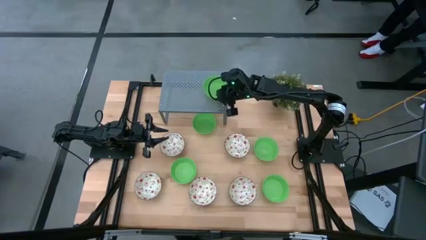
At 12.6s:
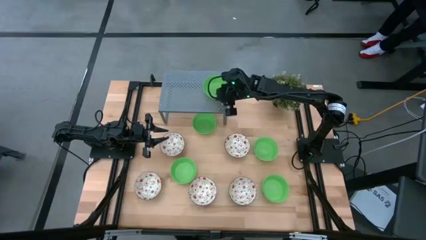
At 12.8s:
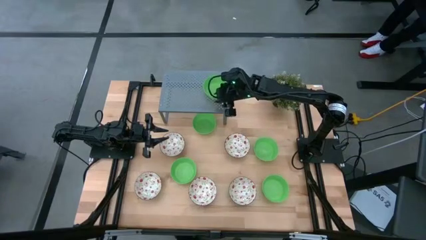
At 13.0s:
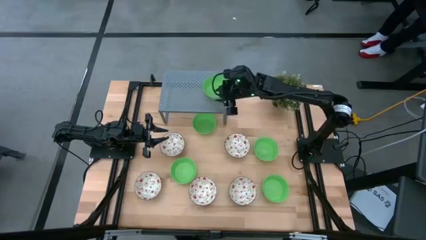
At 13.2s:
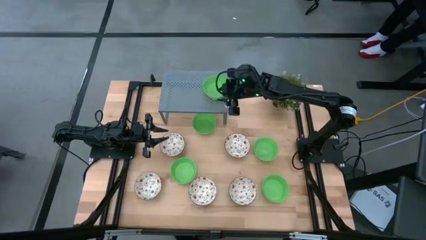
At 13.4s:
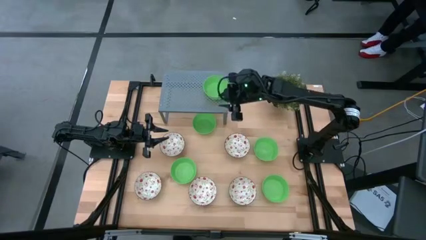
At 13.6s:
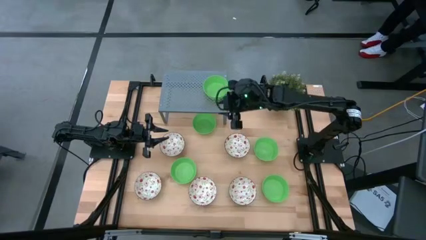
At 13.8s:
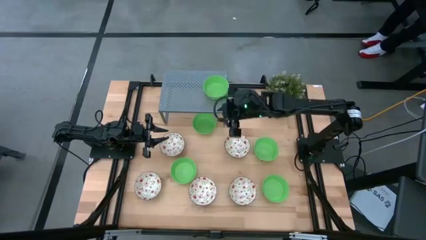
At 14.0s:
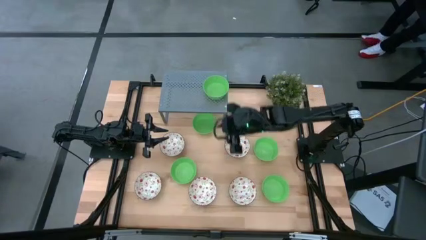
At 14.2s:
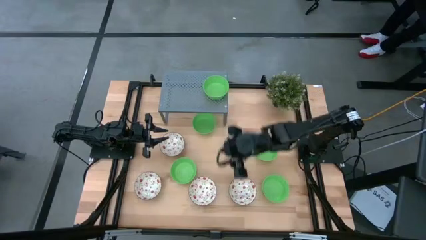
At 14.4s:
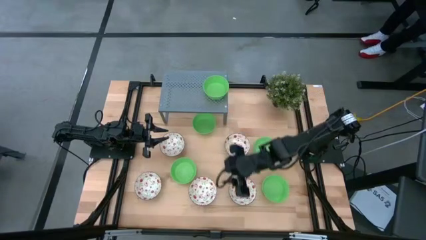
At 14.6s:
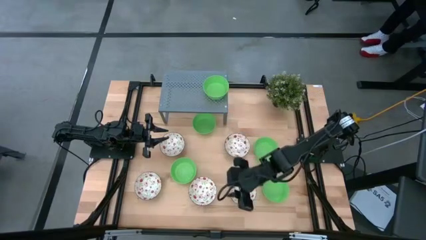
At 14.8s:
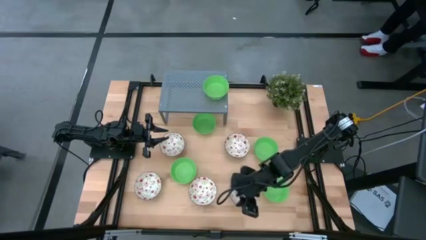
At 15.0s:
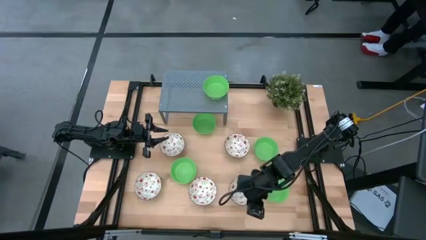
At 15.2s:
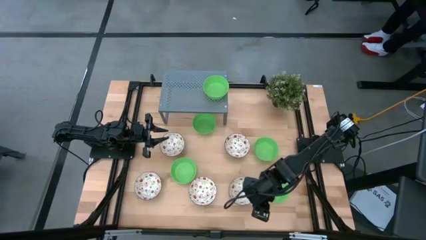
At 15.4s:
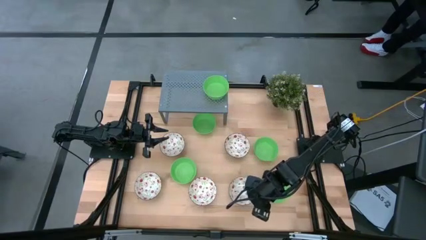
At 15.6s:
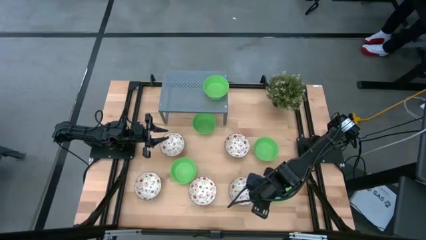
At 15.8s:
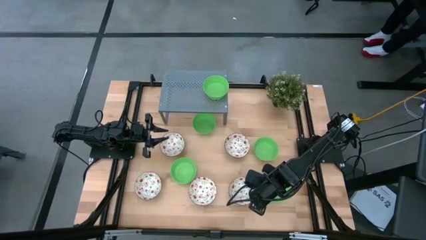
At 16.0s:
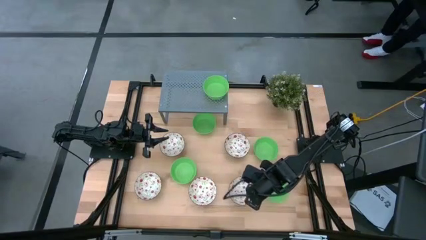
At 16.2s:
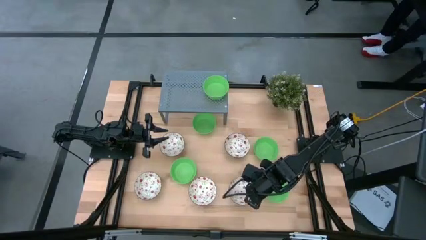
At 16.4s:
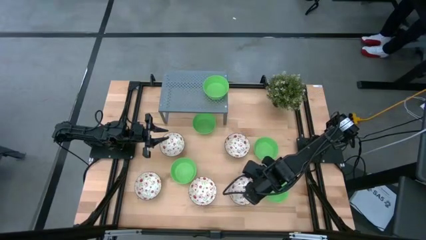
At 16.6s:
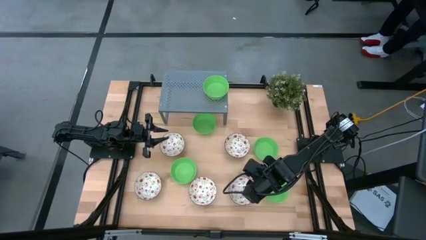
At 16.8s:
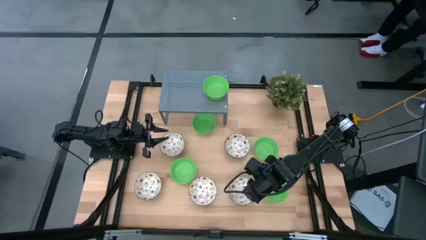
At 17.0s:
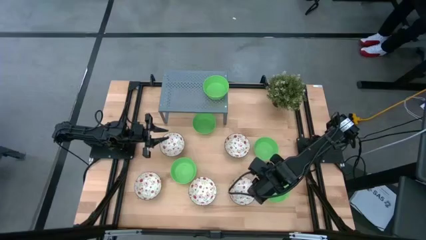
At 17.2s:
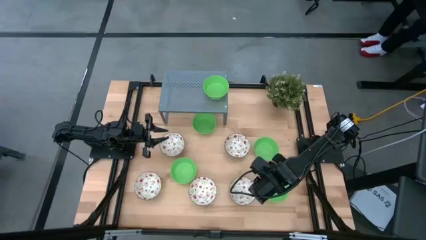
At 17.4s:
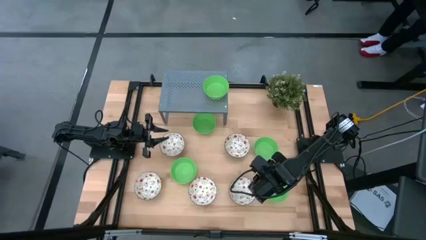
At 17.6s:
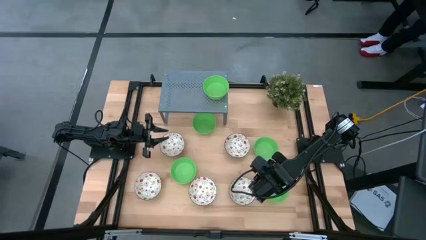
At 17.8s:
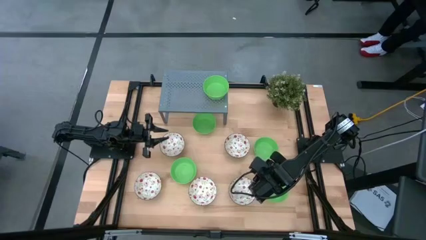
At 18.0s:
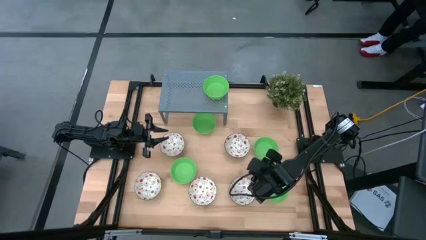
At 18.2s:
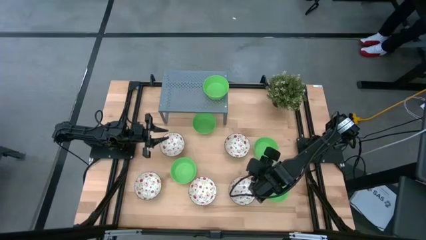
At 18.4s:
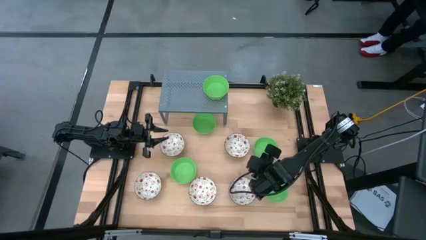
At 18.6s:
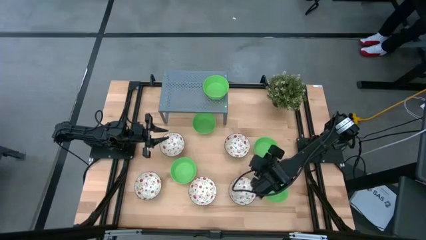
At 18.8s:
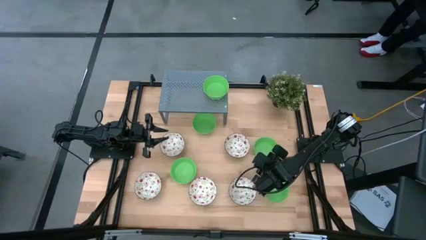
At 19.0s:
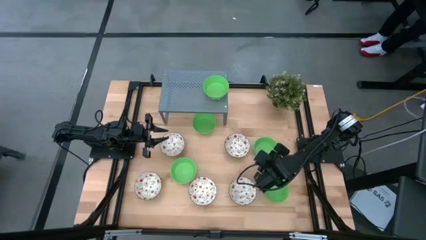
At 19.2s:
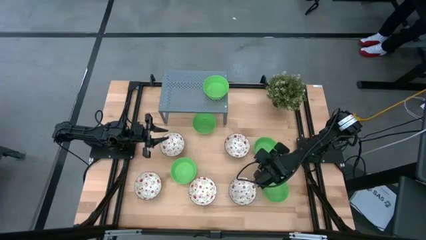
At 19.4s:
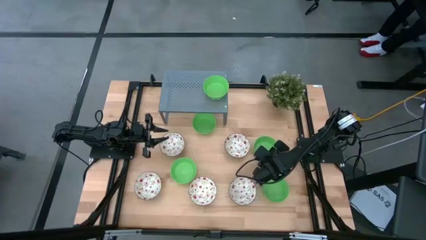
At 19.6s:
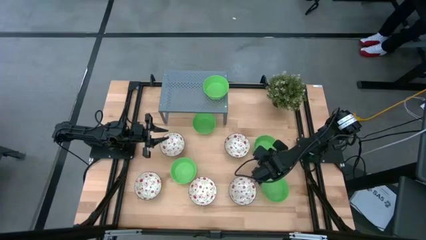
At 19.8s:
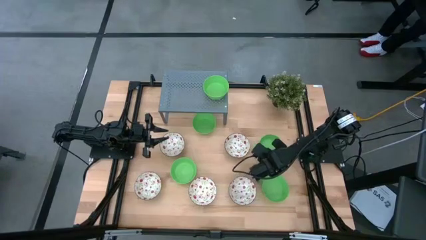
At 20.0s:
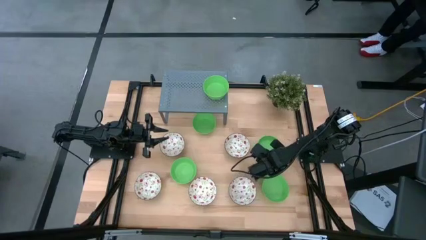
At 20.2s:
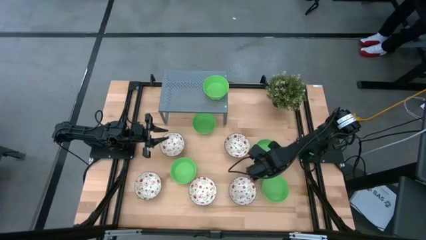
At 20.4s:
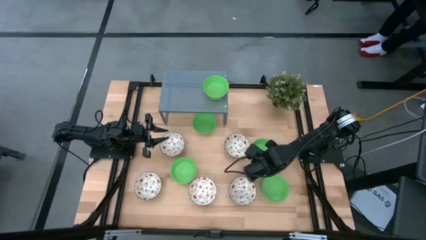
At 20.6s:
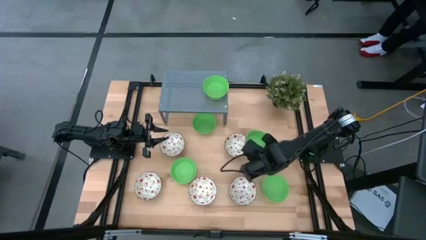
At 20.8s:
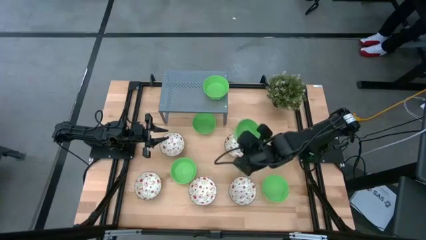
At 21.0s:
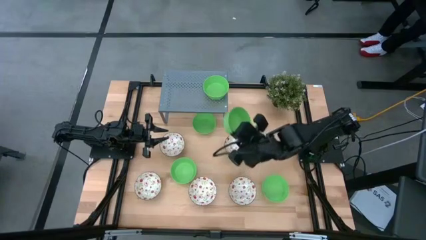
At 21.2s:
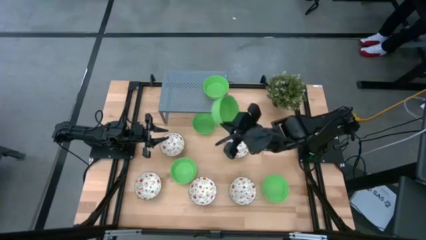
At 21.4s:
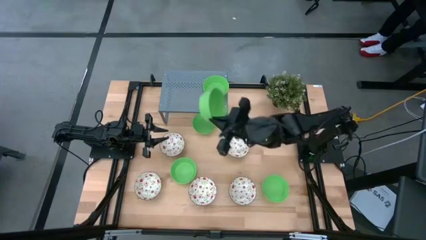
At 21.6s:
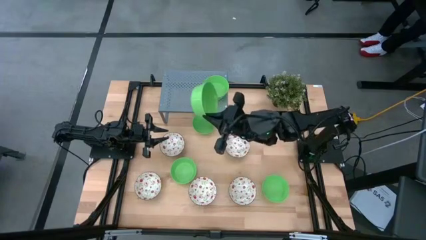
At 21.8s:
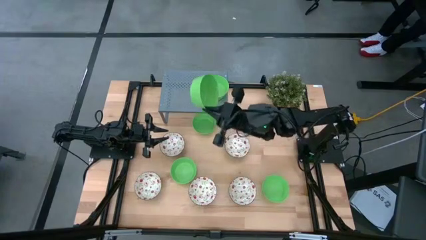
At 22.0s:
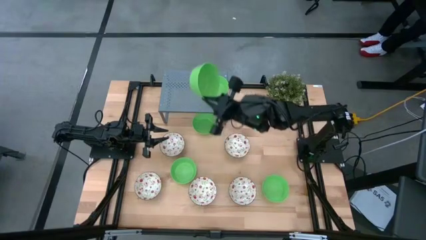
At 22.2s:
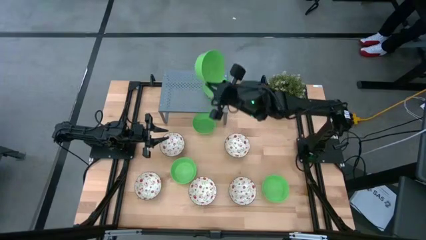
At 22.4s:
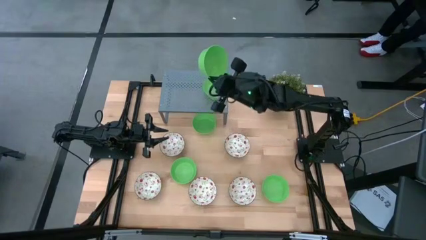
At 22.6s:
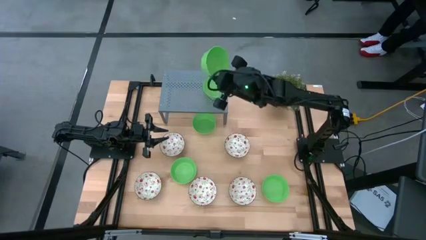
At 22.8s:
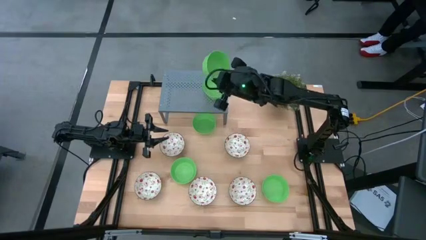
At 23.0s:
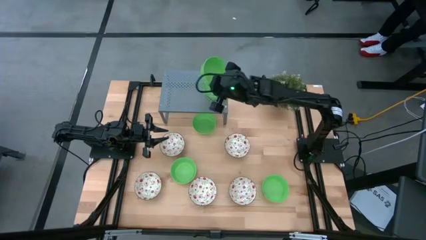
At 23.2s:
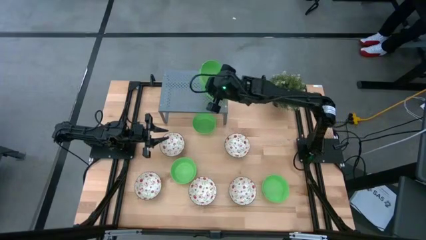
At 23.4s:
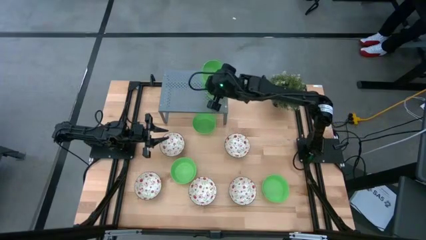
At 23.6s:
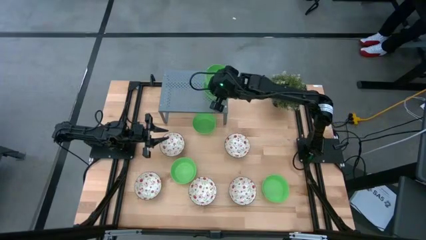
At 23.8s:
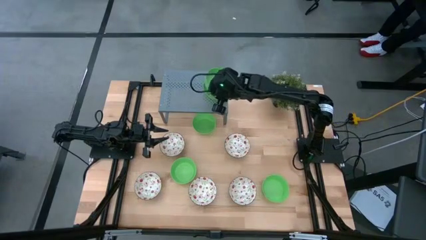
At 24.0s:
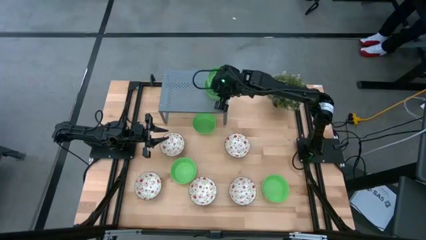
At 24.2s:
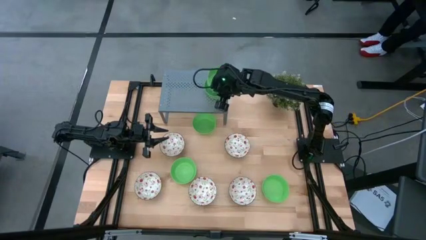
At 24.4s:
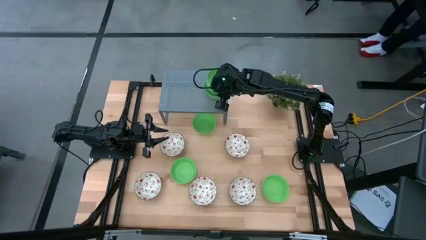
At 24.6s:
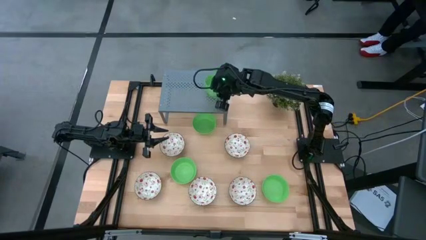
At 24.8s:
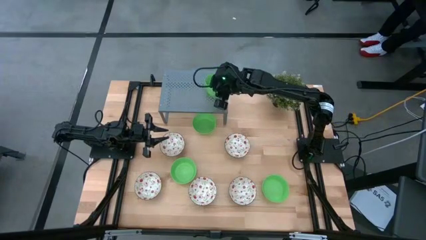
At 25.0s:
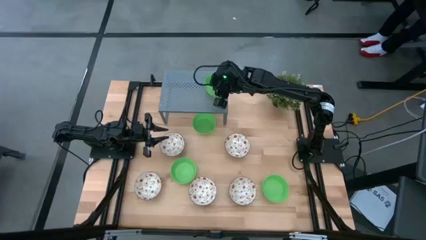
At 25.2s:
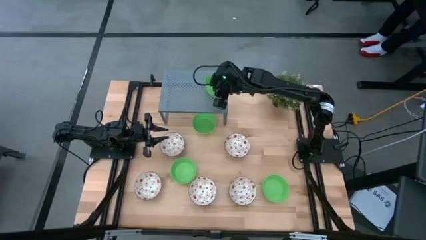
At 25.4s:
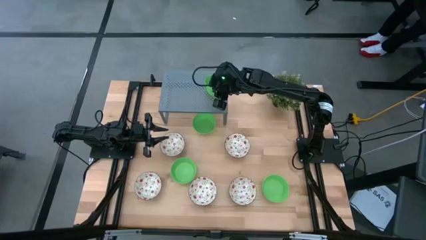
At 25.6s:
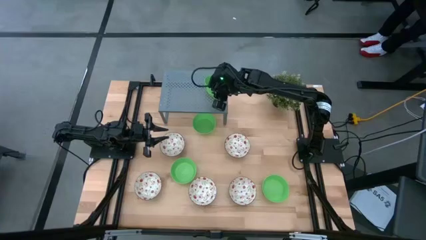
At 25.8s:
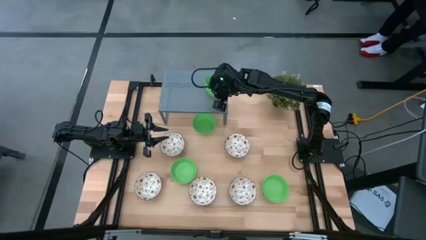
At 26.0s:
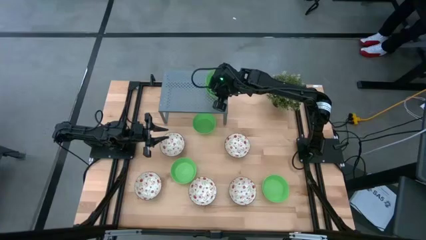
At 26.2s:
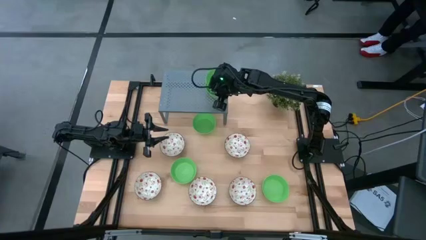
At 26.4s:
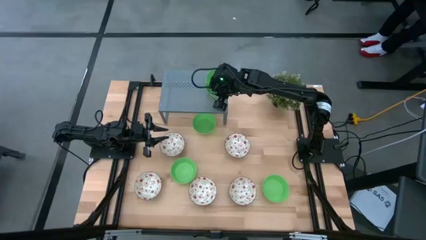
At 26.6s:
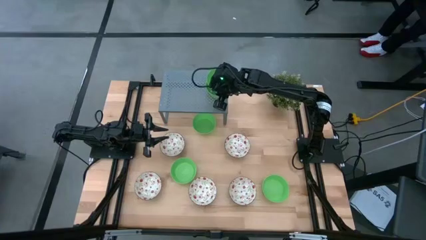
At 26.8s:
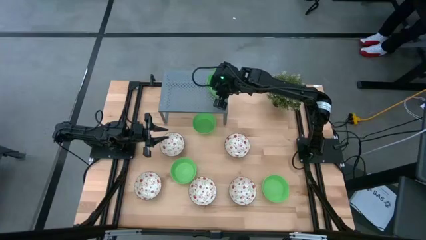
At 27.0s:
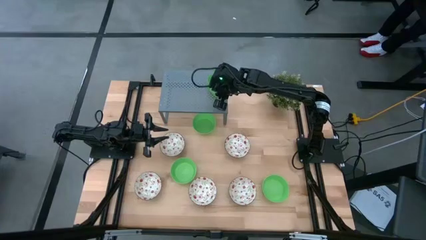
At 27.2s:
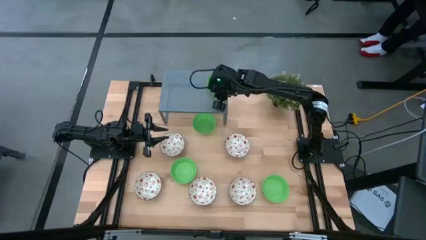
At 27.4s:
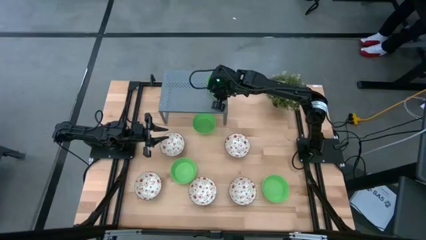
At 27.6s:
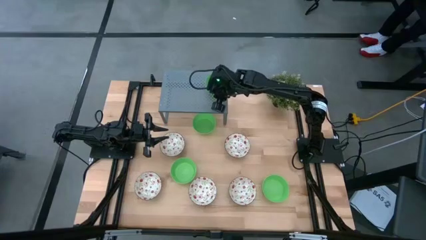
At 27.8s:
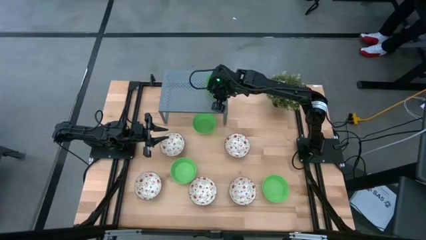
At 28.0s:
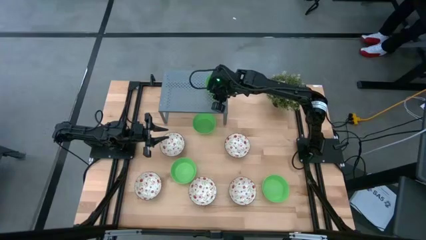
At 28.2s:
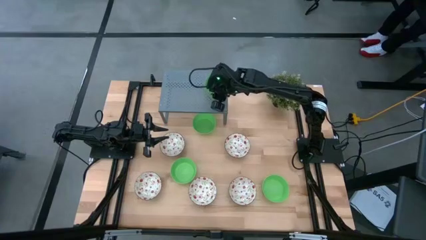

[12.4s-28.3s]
Task: Pick & Place Mini bowls
Stack the green bowl on the green bowl on the shelf
